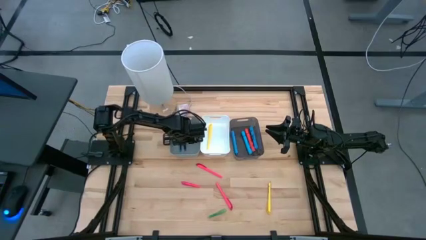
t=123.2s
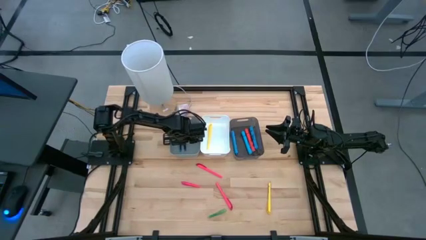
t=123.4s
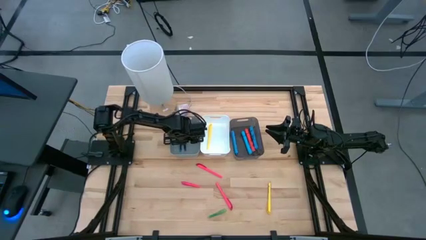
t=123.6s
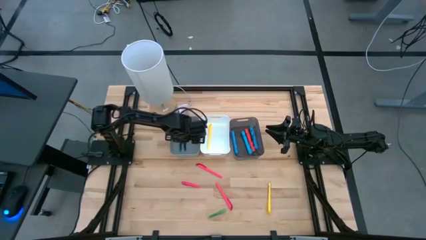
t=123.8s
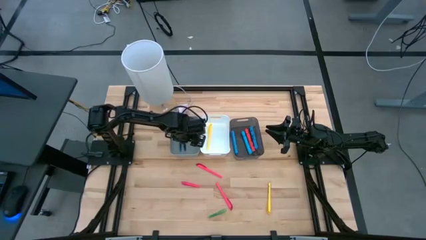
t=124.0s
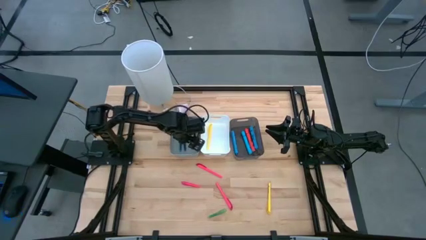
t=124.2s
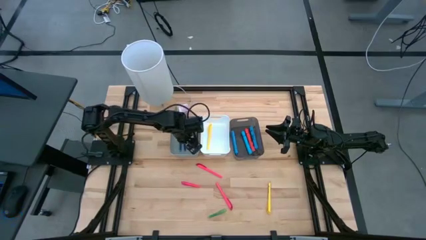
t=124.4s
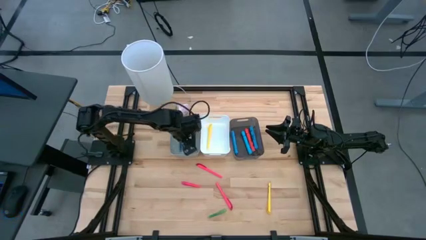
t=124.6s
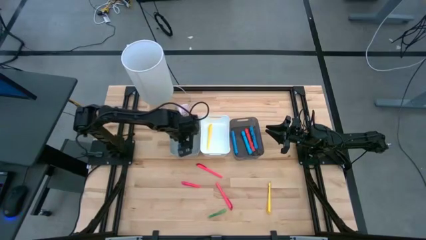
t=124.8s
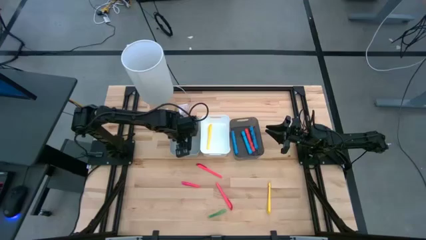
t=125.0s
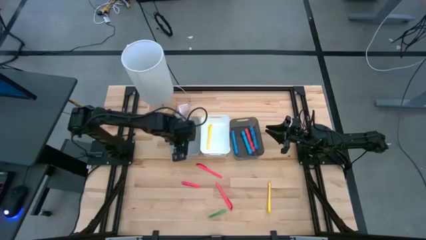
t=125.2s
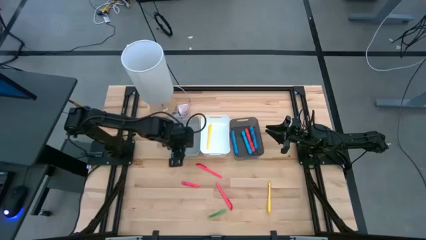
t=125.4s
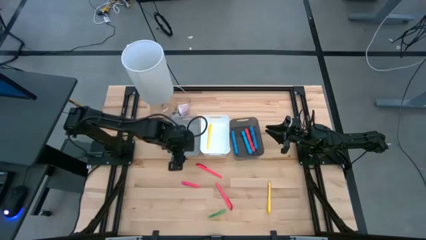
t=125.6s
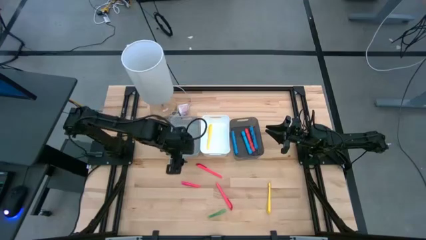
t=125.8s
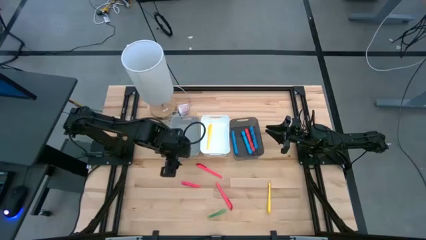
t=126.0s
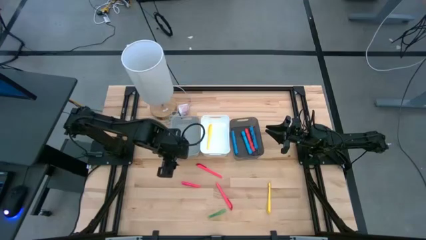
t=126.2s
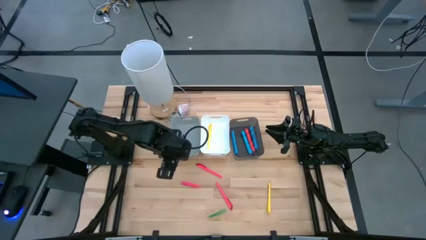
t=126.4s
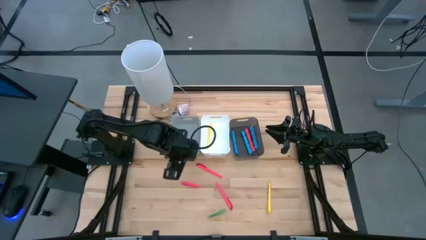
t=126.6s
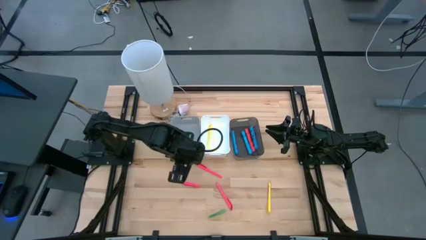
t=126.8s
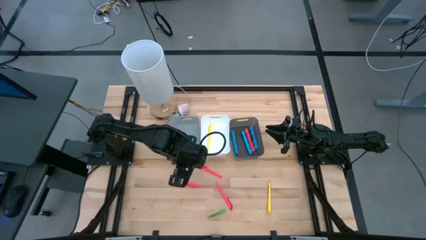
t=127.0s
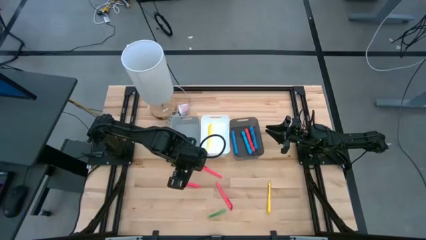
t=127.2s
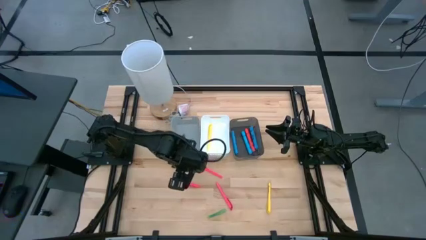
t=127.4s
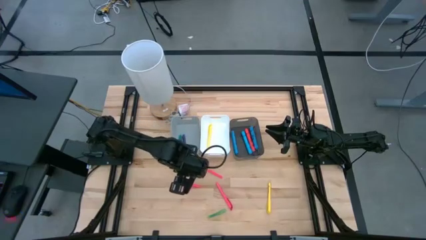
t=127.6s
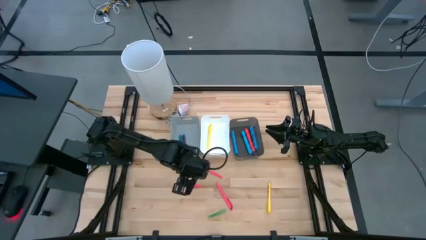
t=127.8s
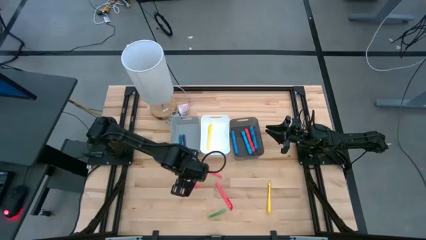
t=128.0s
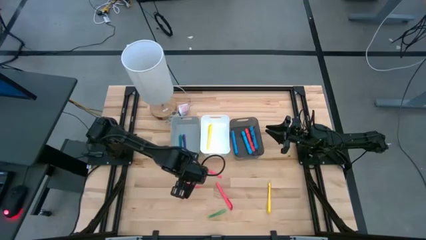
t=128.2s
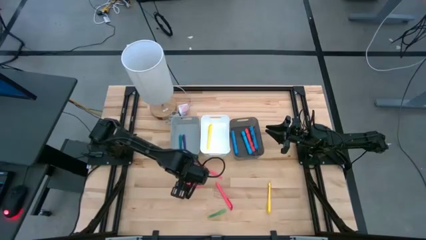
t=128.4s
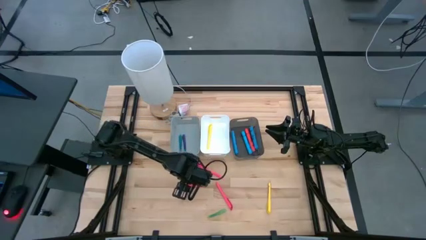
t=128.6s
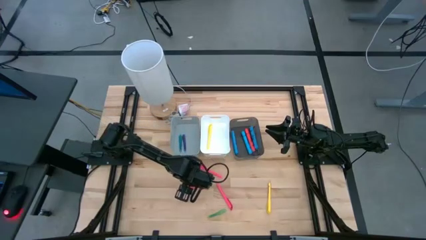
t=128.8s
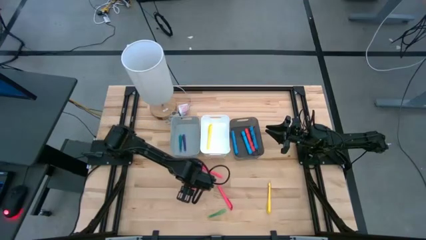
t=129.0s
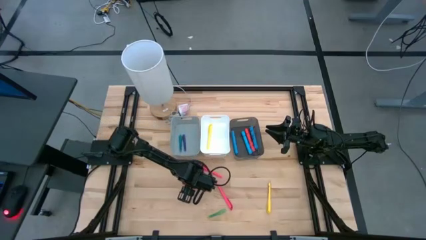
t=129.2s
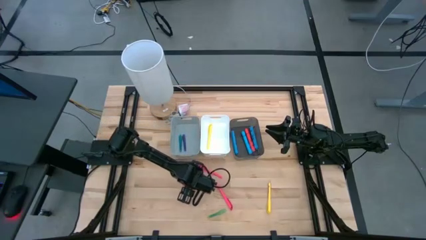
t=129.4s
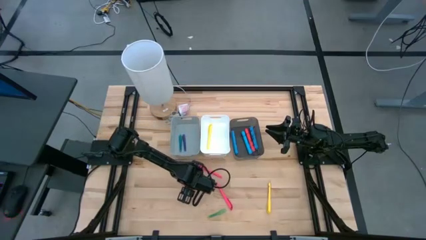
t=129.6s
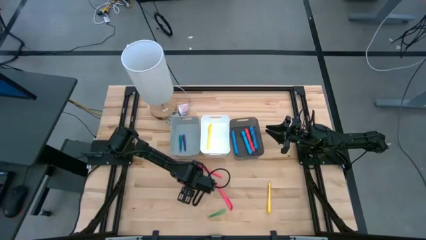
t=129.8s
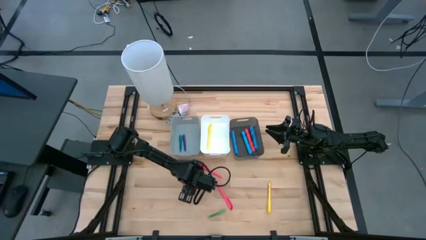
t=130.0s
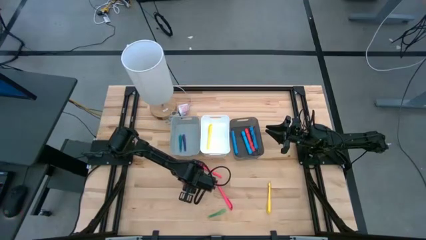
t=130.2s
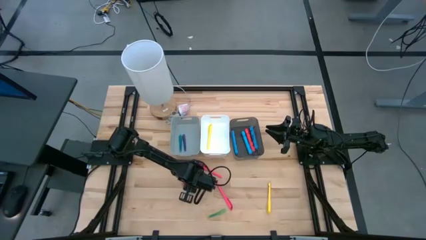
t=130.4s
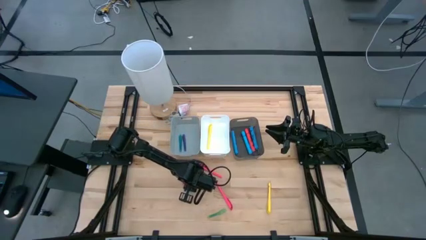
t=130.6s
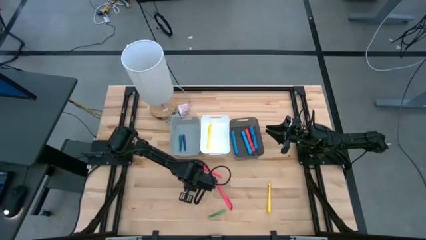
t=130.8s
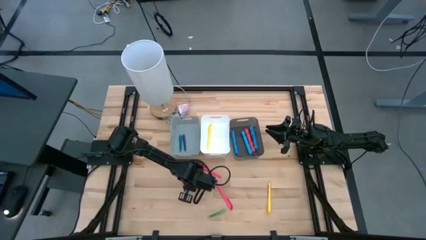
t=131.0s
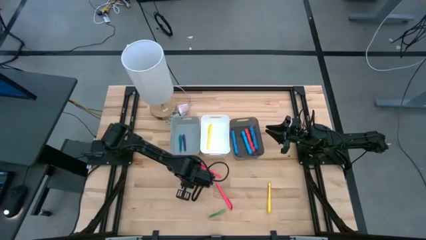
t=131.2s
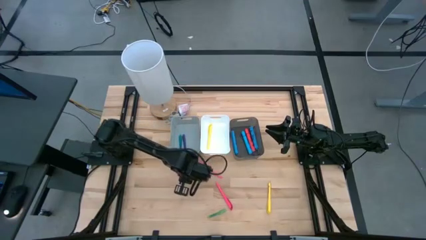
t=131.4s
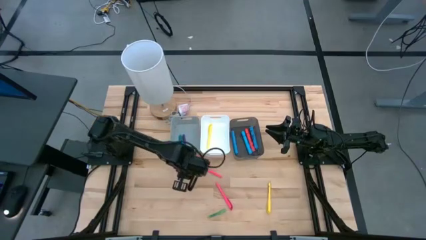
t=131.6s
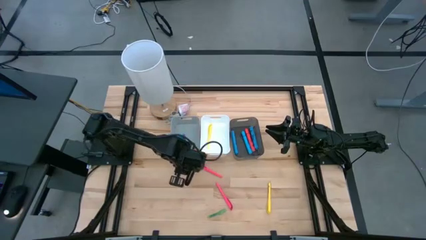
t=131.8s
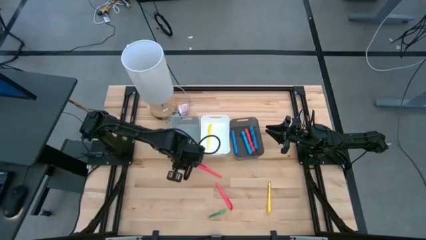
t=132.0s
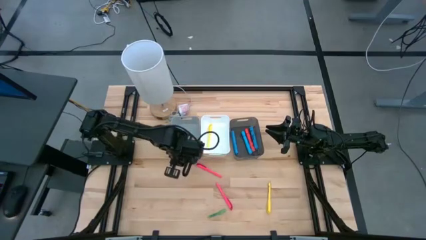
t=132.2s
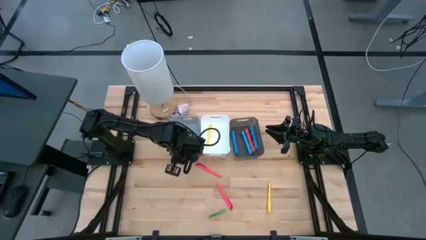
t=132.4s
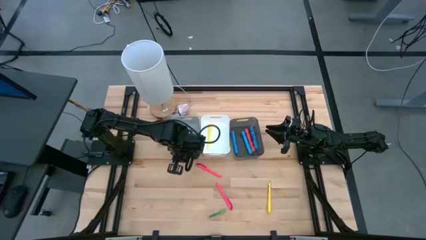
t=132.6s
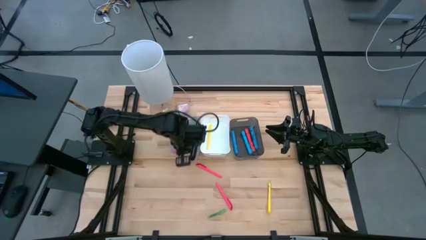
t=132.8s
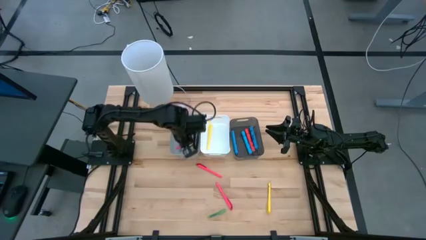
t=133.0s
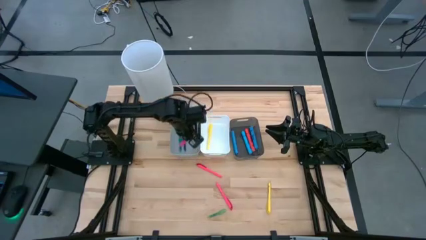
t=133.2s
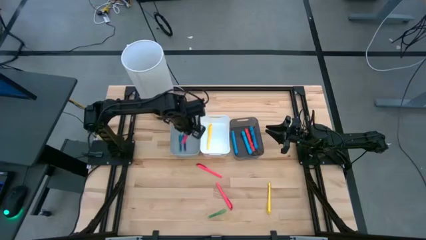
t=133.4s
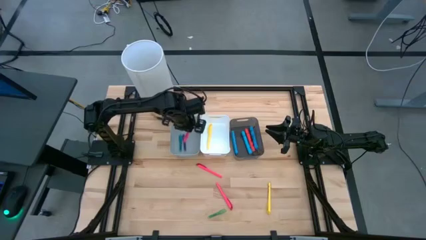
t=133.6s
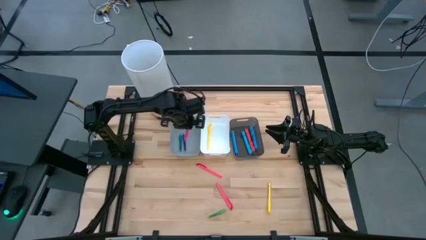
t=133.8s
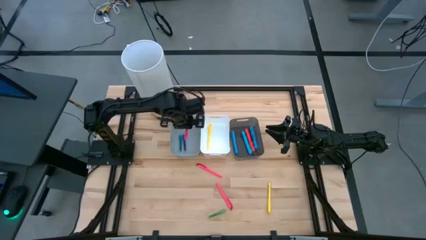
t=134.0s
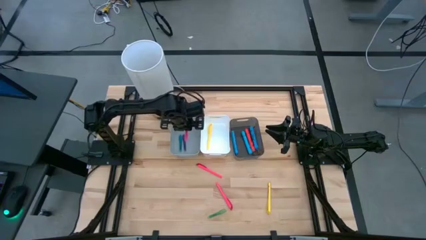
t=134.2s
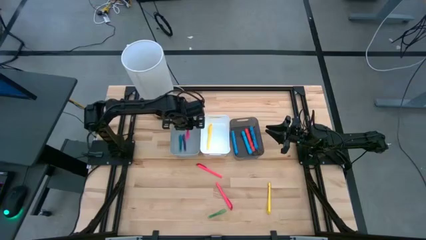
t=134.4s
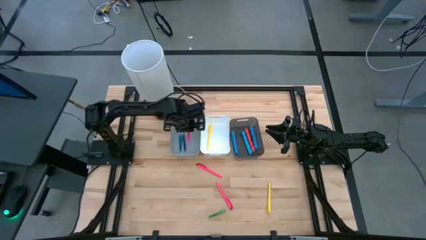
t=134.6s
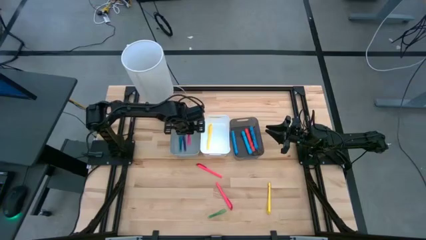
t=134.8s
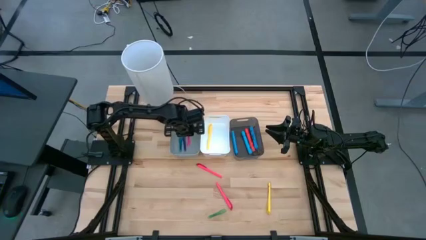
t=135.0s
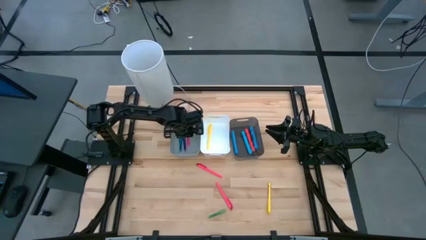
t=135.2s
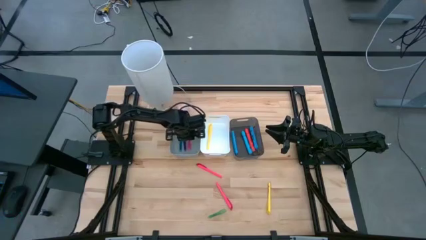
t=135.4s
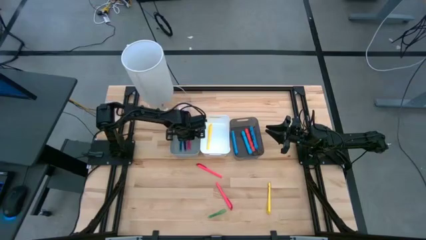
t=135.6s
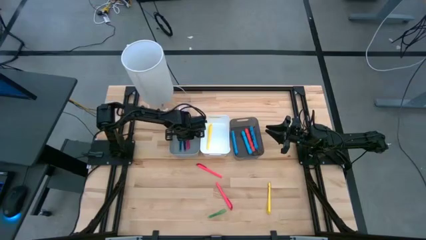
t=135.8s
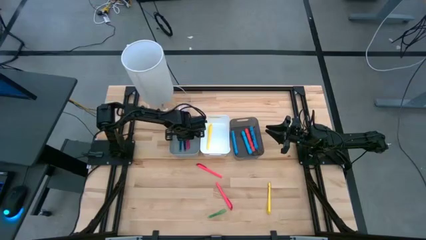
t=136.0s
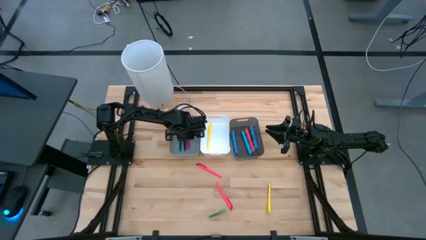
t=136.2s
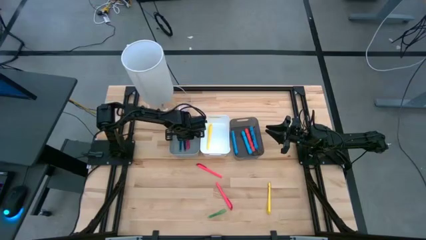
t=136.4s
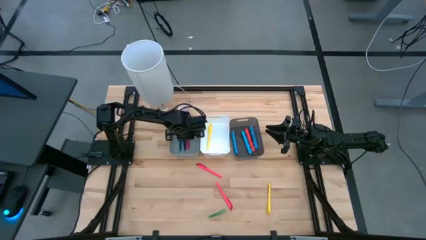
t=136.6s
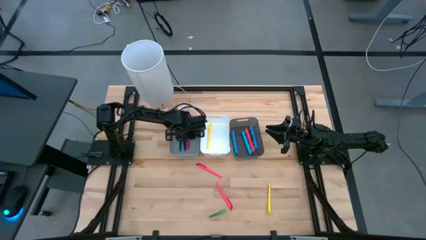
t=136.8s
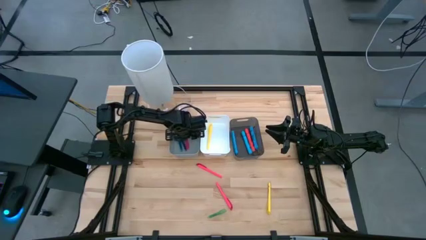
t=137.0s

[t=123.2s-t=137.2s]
Task: Pick & Place Markers
Put the pink pen into the gray bin

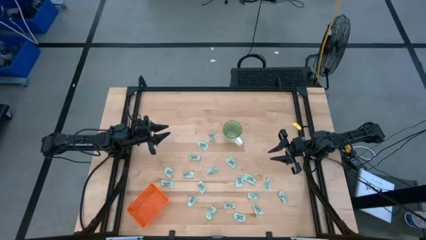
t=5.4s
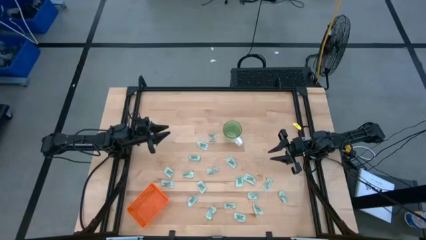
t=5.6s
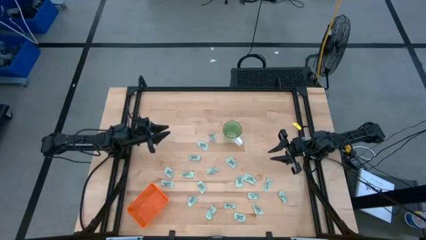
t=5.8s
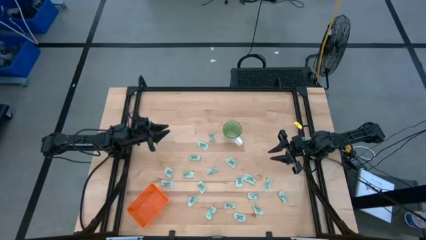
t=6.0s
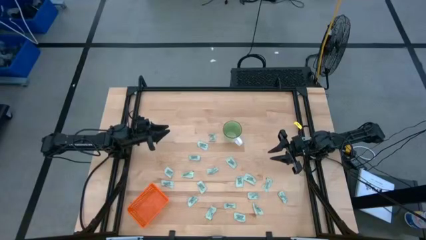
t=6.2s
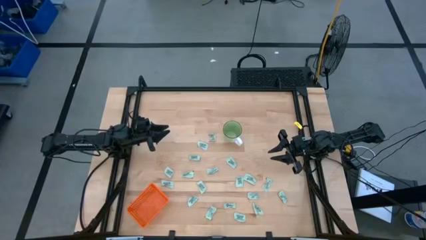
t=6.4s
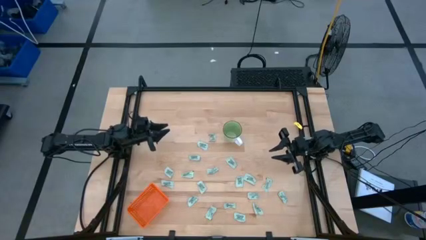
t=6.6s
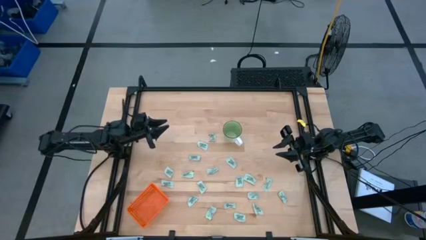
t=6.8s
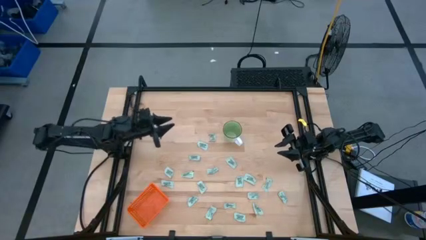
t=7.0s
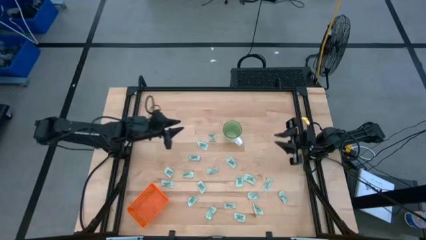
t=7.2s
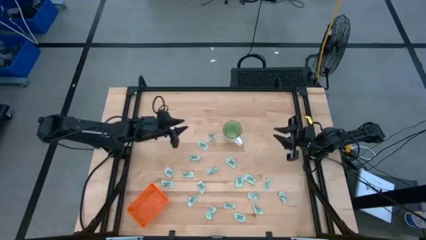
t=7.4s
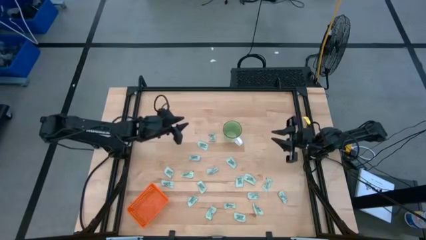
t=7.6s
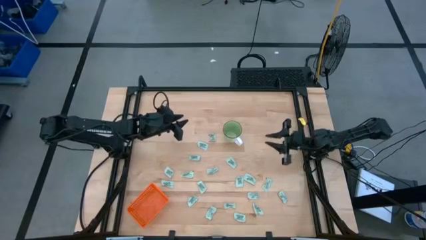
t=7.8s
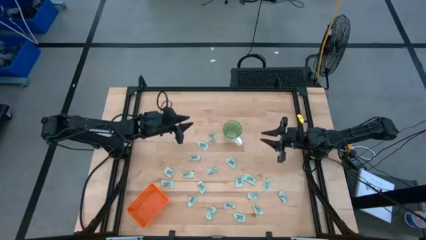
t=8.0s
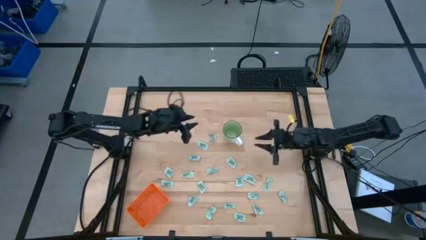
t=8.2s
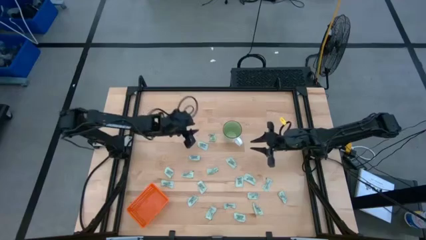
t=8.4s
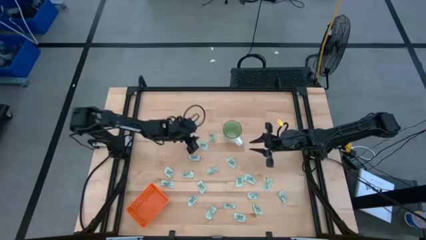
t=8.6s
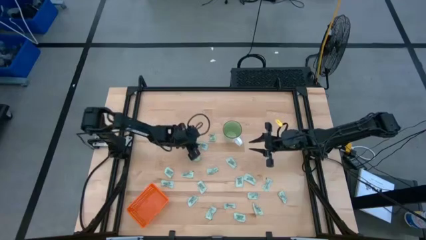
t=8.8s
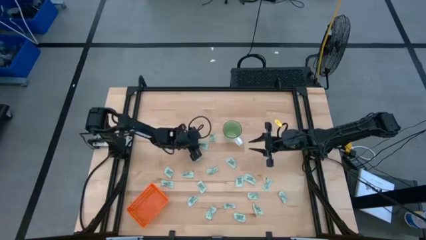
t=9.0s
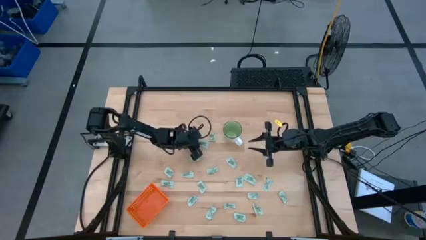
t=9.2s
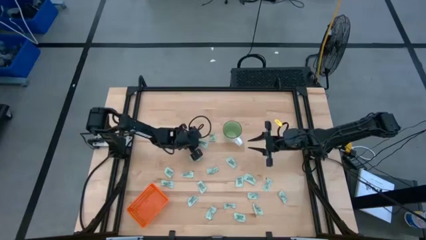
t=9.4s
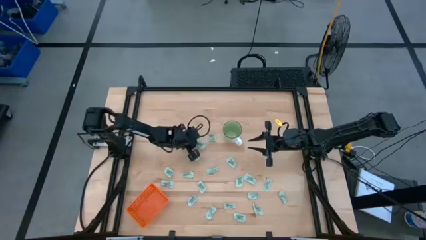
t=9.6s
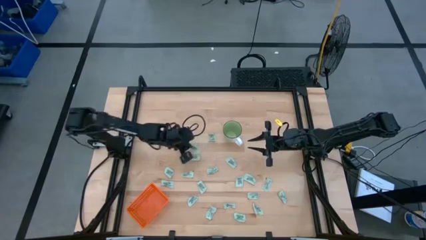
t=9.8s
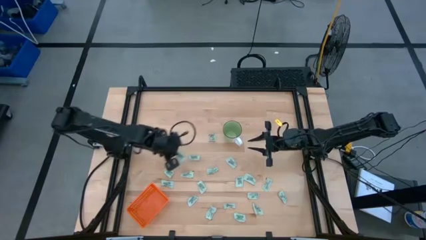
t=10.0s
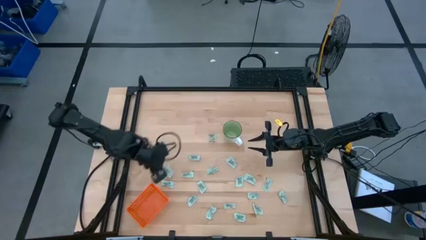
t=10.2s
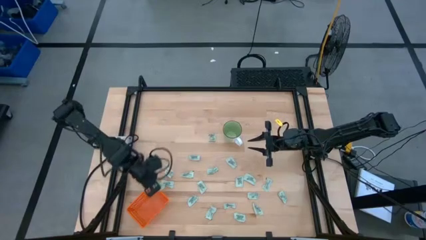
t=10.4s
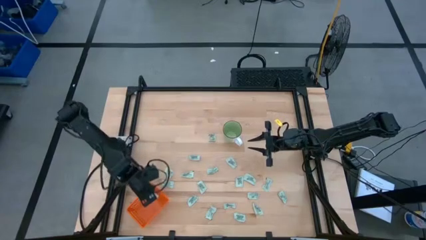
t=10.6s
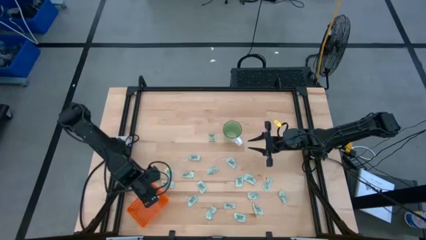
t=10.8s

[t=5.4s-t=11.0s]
Task: Pick and place Stevia / Truvia into bins
Put the light green stevia packet into the orange basket
